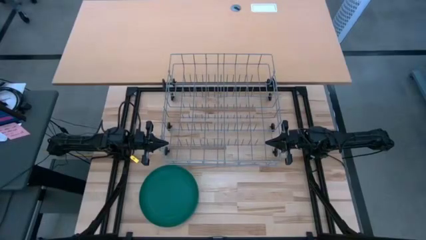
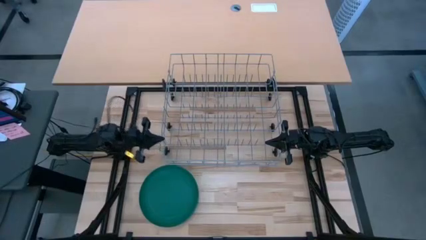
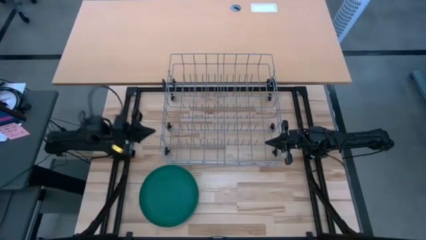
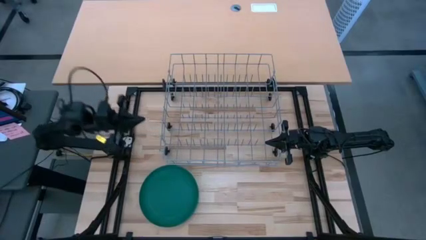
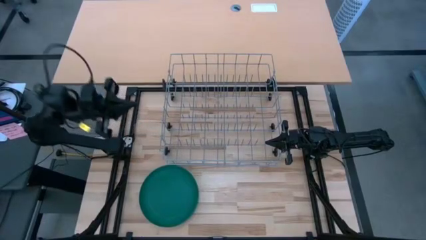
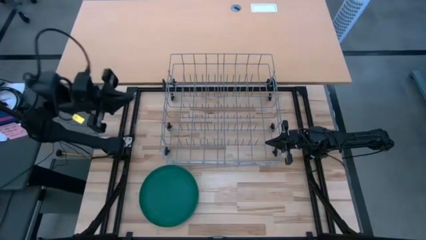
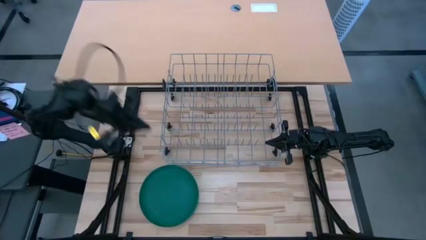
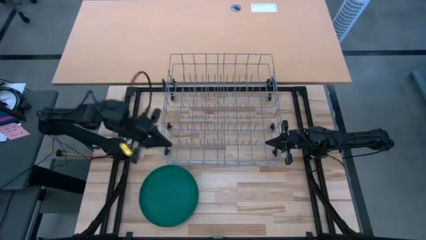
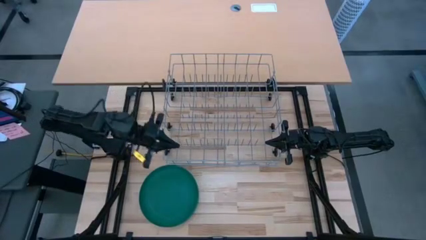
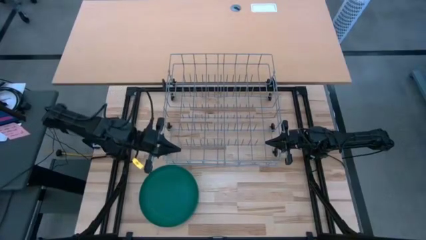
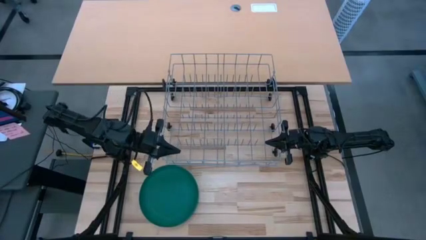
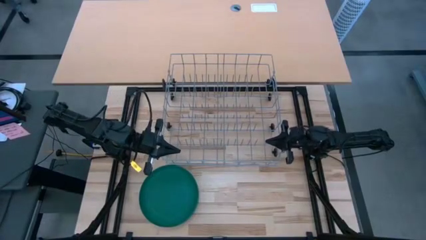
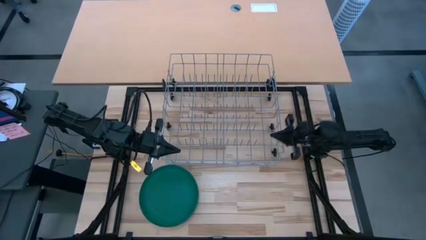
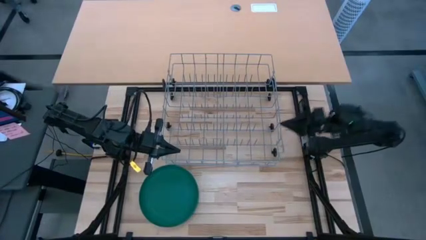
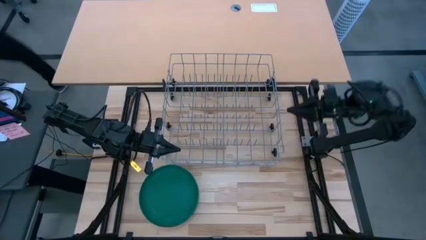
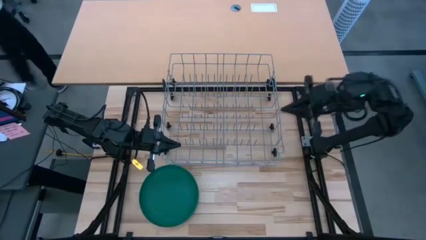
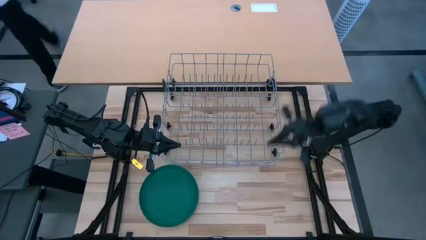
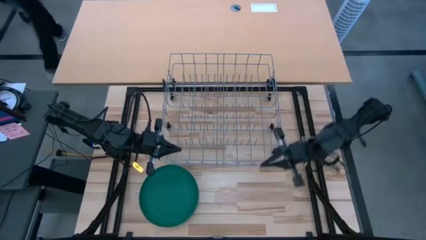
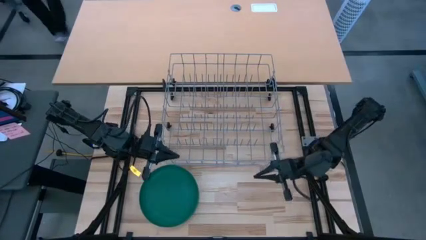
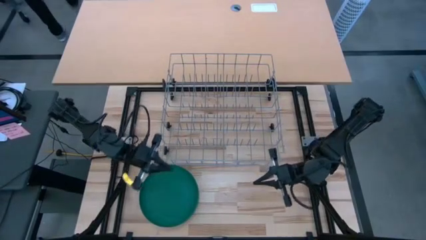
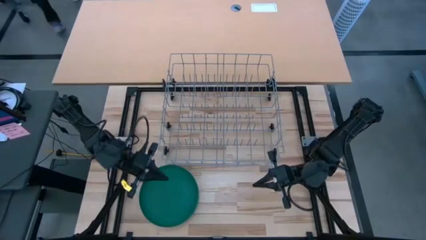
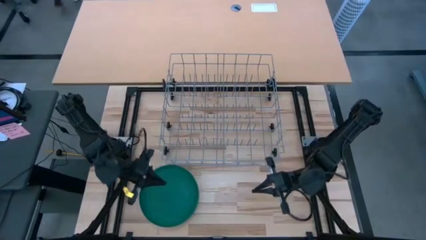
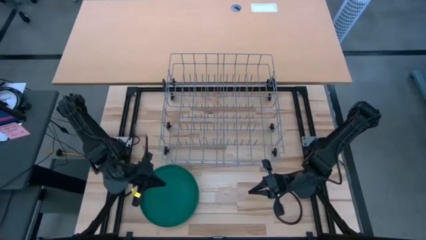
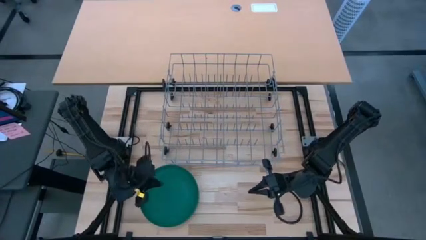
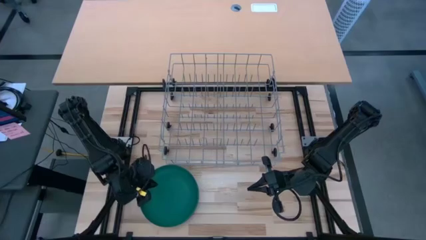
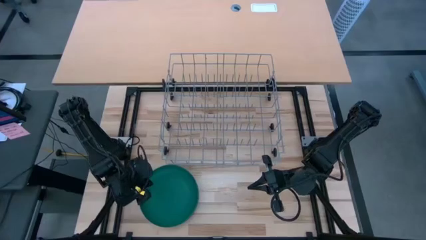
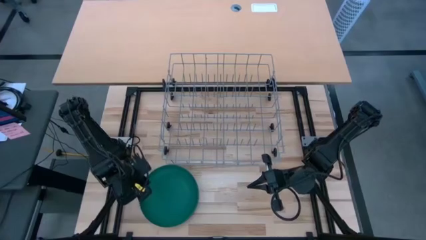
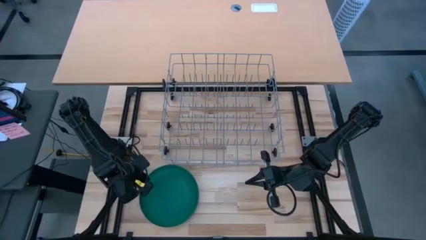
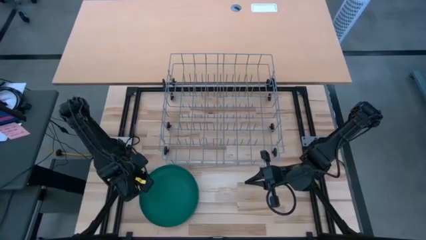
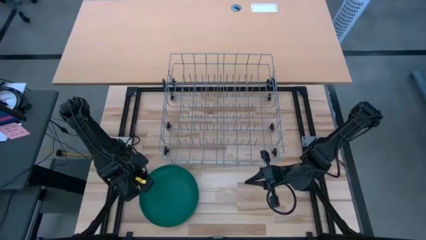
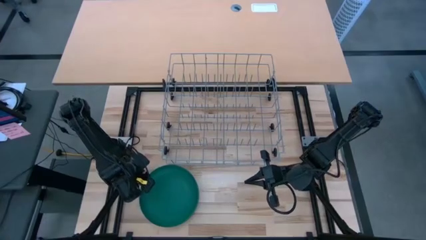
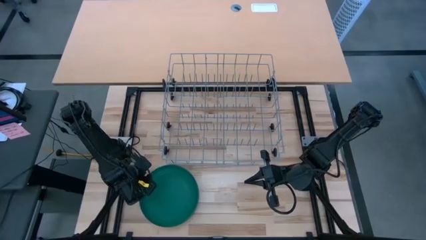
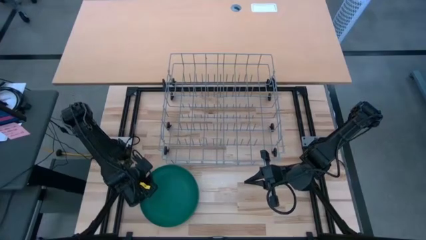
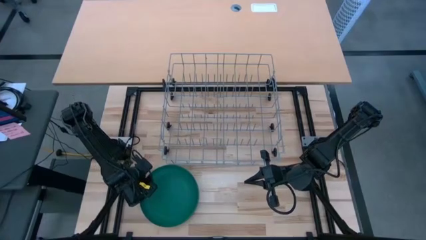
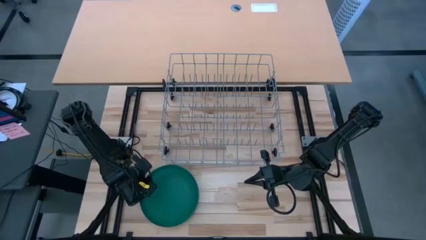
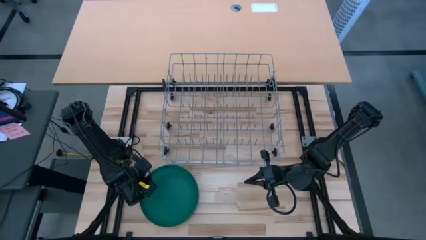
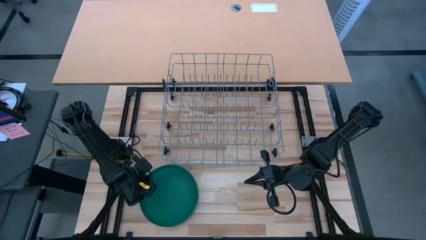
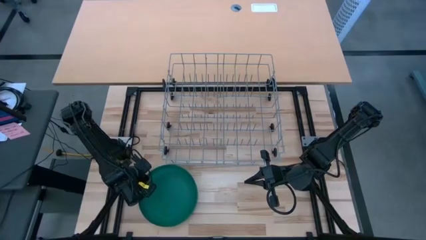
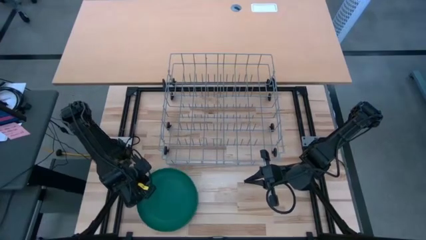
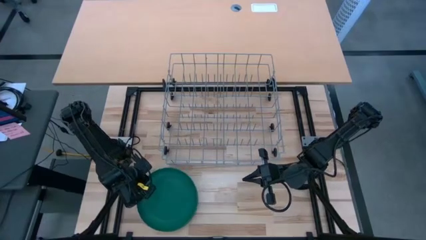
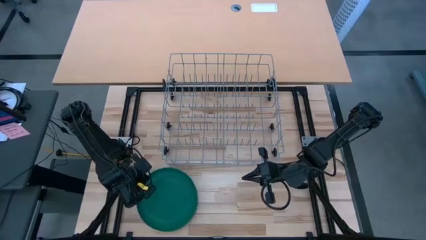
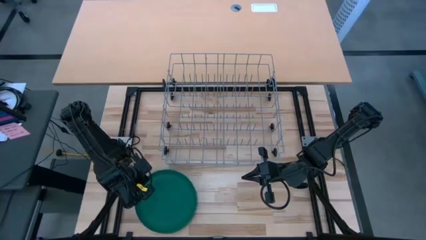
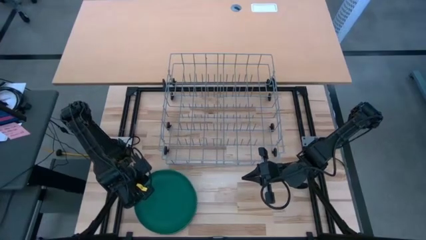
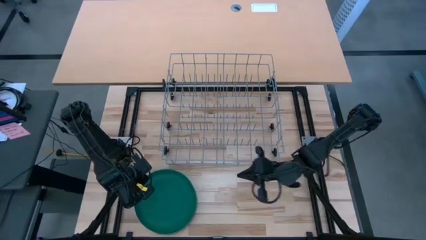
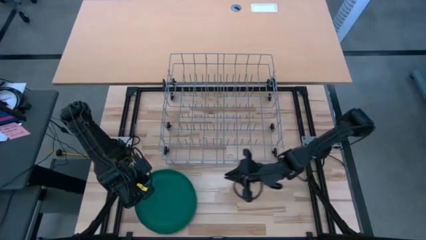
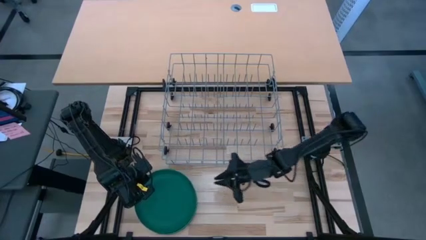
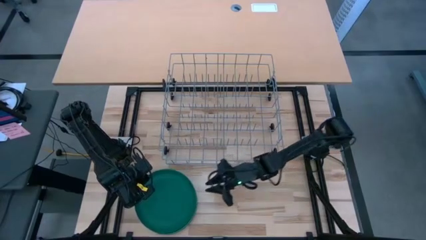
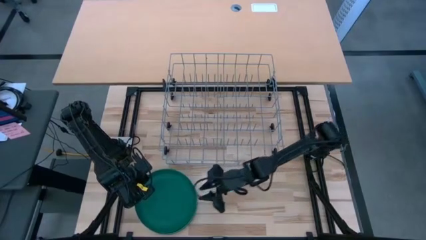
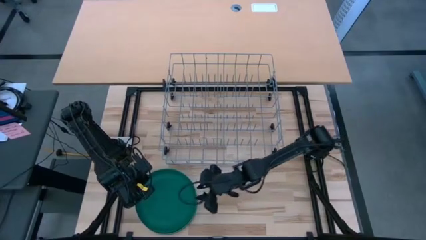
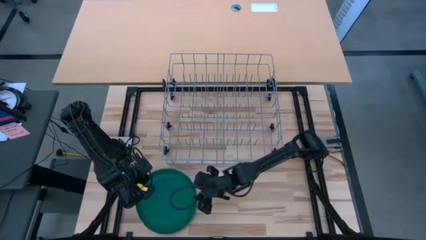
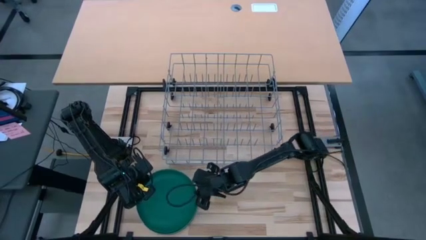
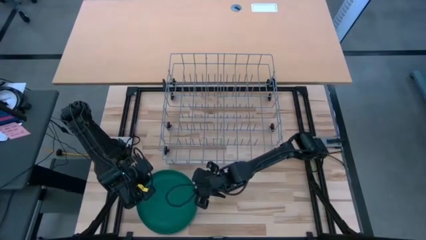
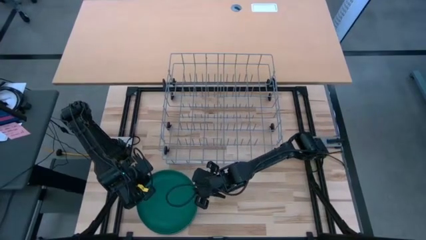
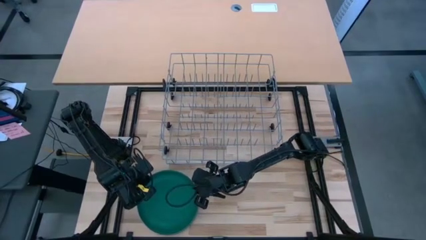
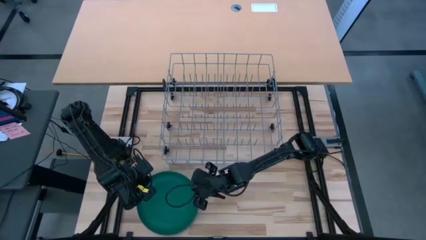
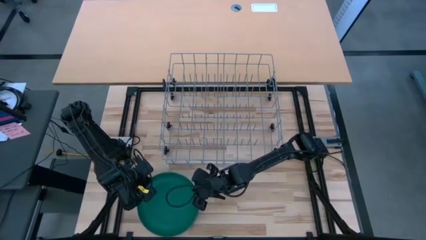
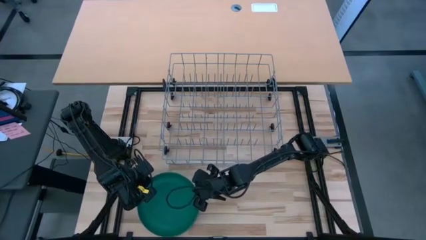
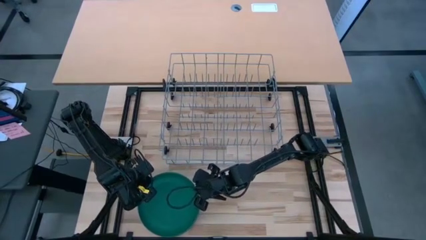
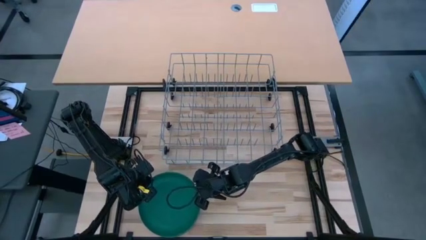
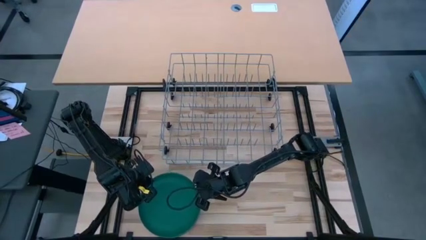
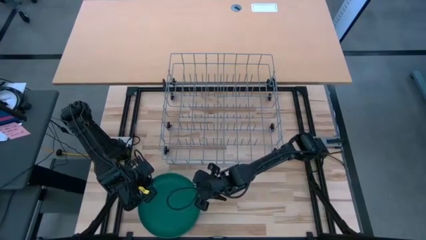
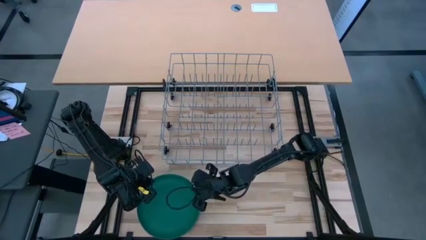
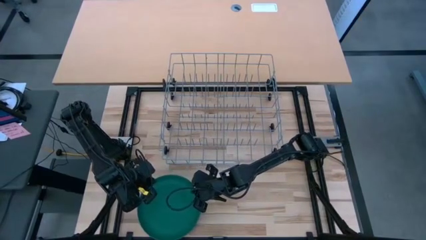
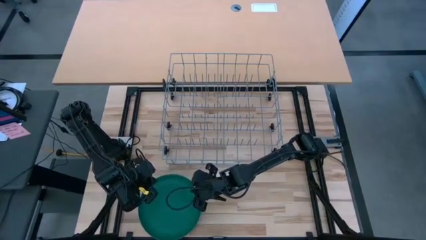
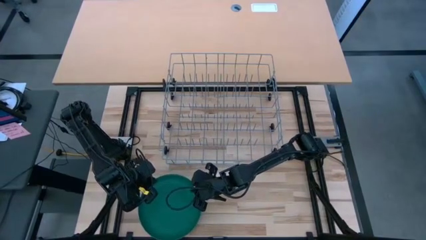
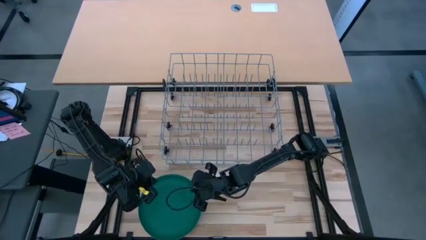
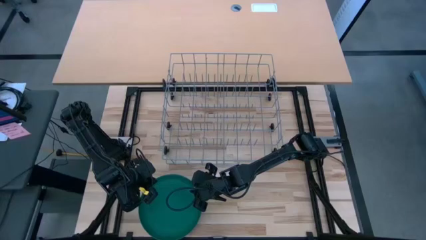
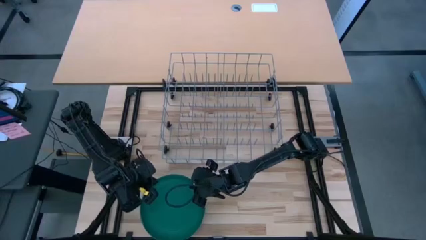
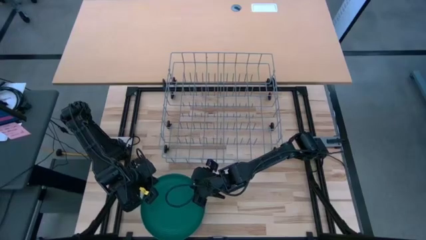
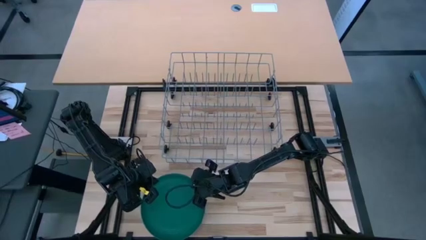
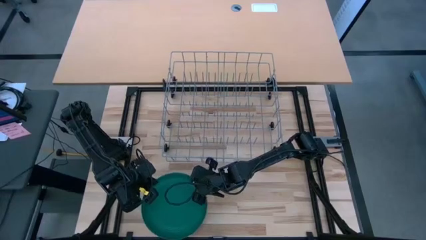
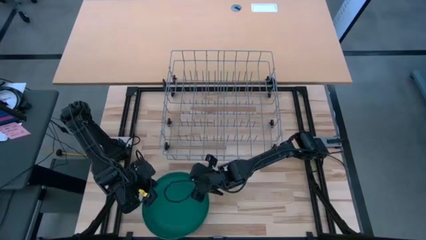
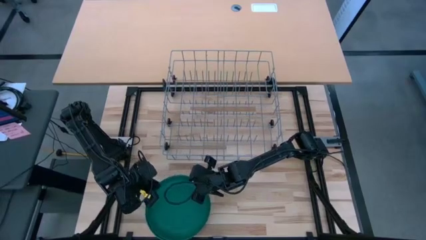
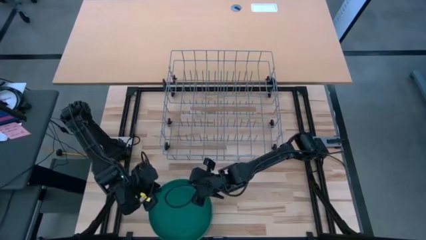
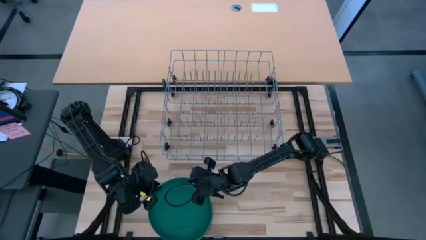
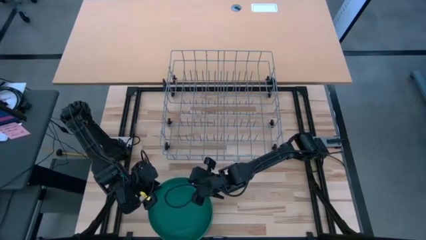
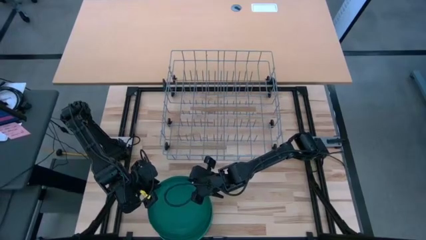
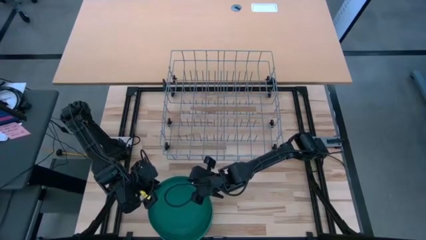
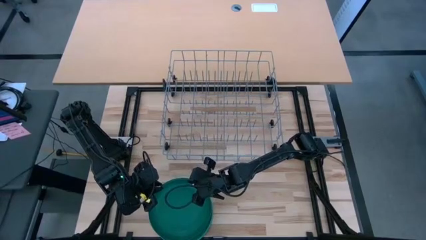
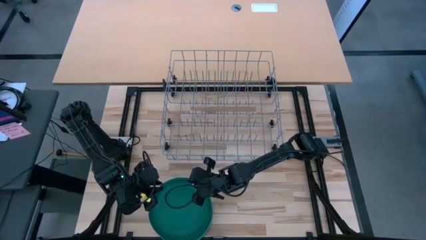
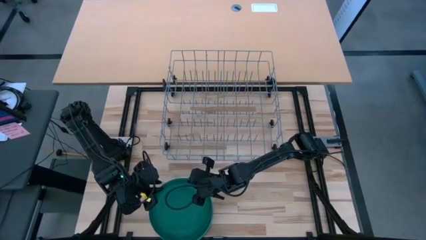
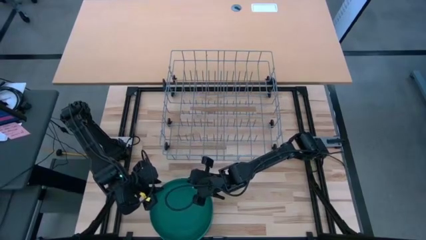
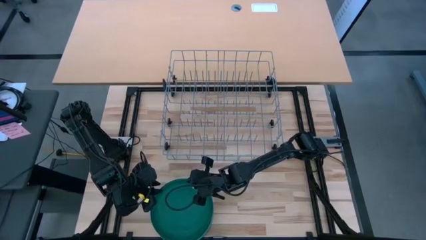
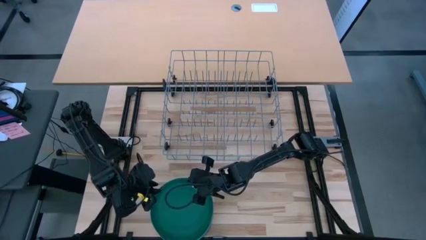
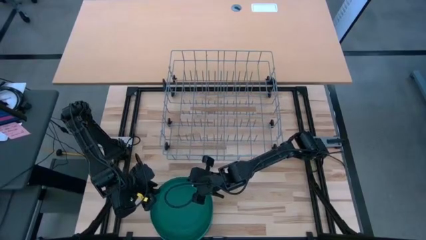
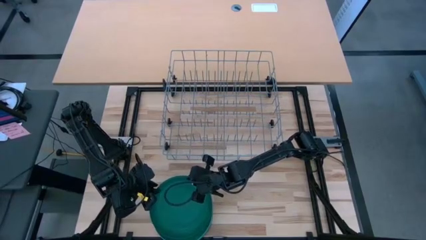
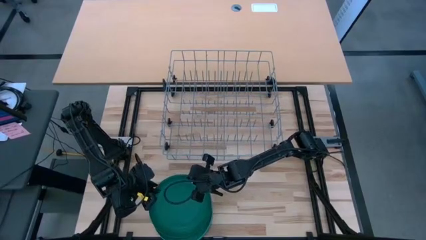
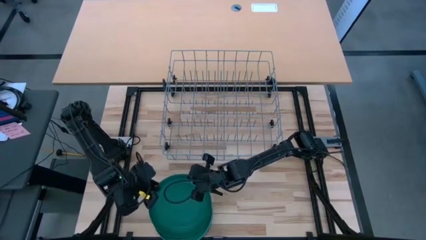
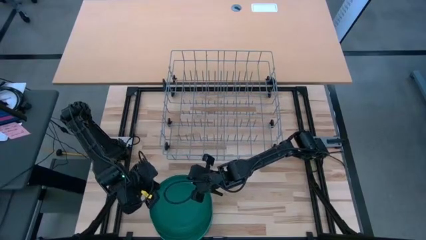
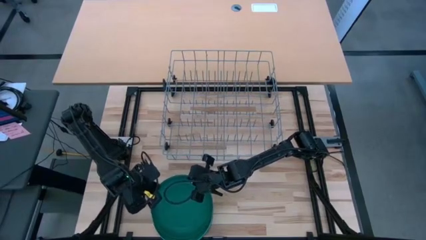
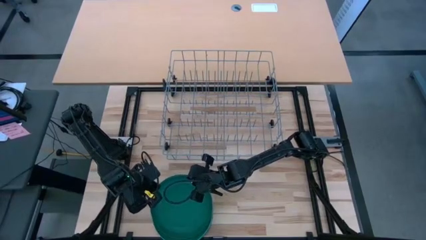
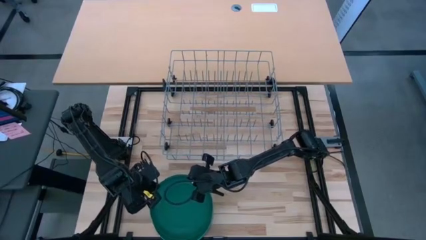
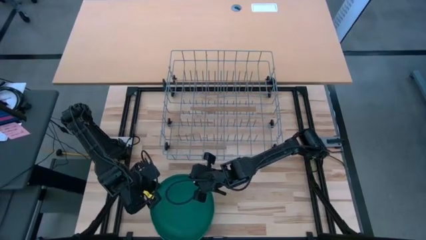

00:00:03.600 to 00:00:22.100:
Task: Sort dishes
Put the dark blue plate in the dish rack
